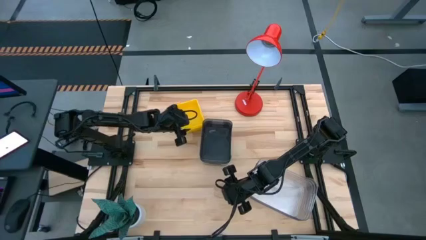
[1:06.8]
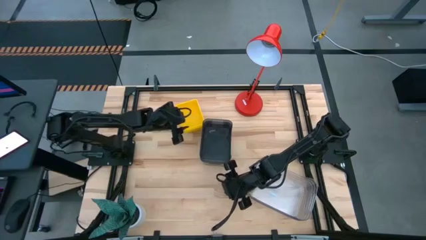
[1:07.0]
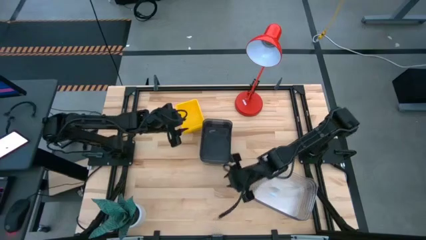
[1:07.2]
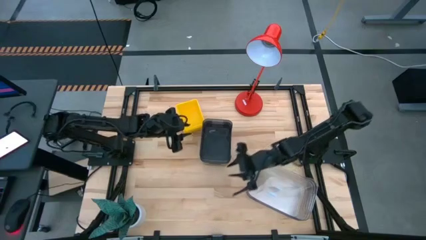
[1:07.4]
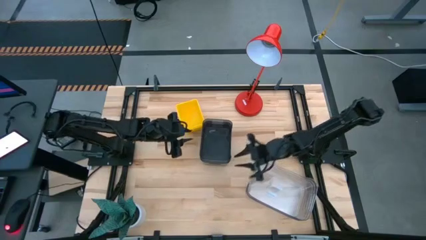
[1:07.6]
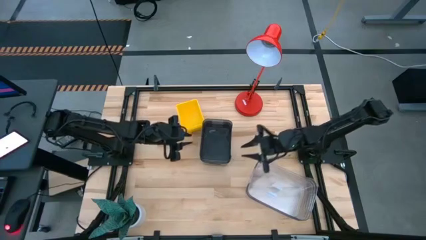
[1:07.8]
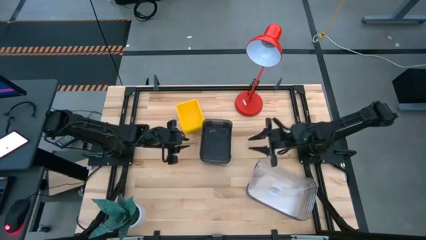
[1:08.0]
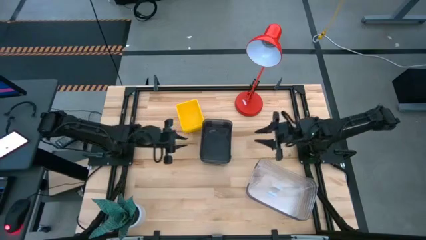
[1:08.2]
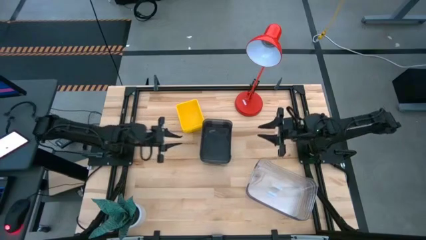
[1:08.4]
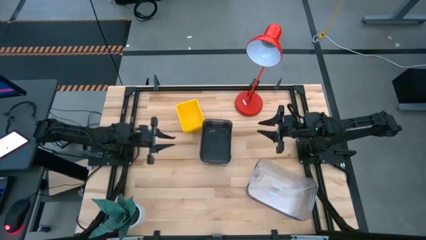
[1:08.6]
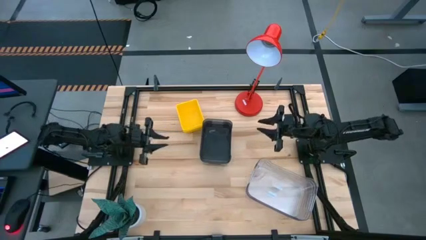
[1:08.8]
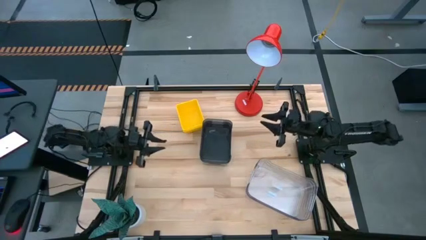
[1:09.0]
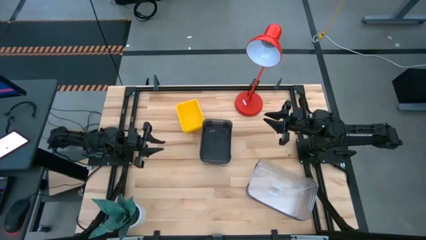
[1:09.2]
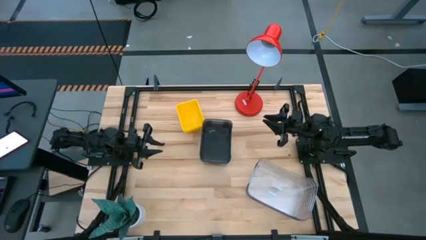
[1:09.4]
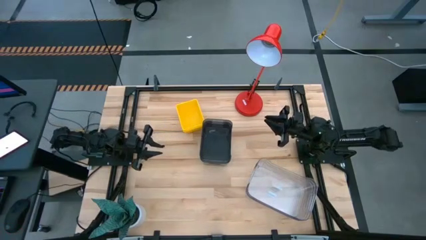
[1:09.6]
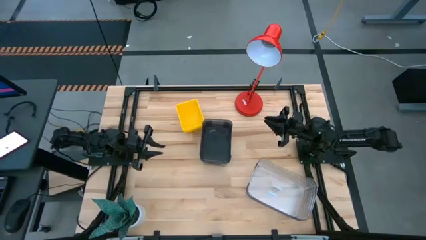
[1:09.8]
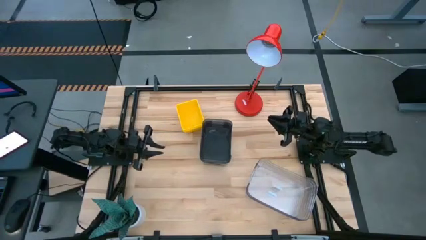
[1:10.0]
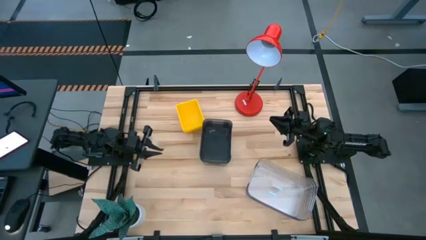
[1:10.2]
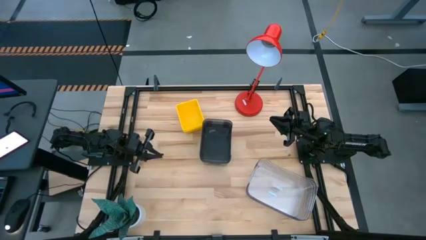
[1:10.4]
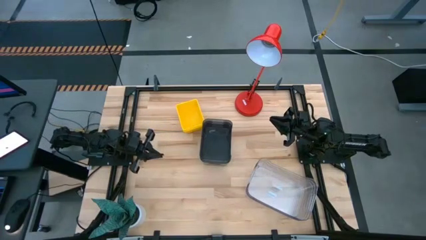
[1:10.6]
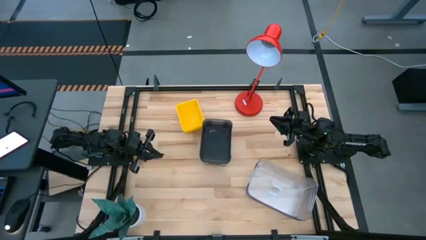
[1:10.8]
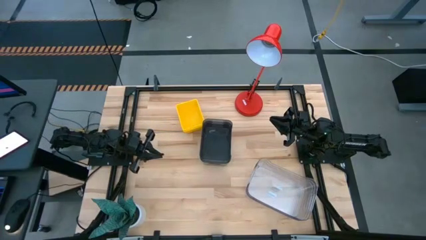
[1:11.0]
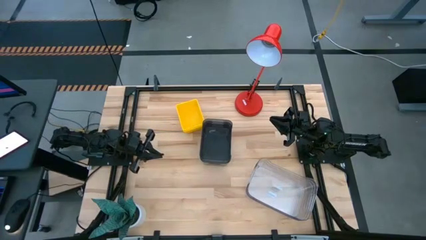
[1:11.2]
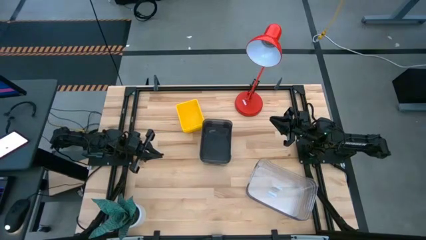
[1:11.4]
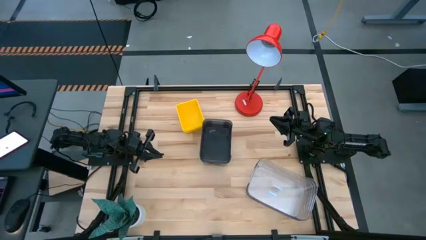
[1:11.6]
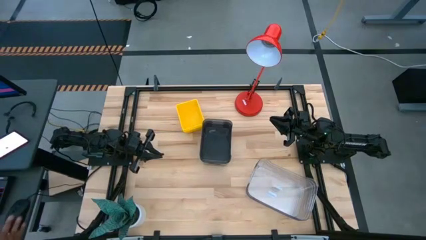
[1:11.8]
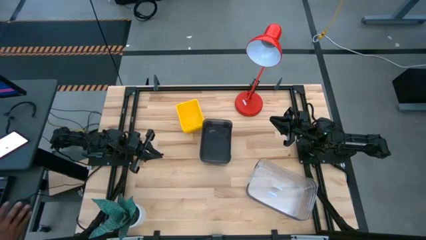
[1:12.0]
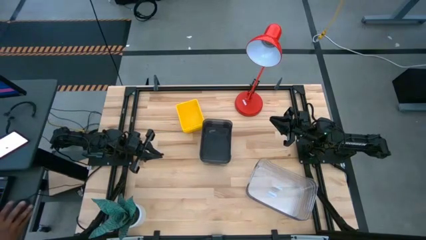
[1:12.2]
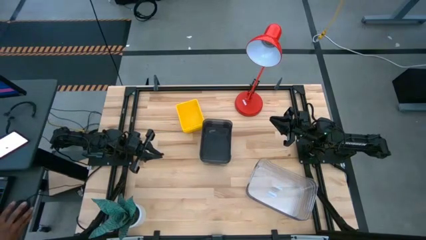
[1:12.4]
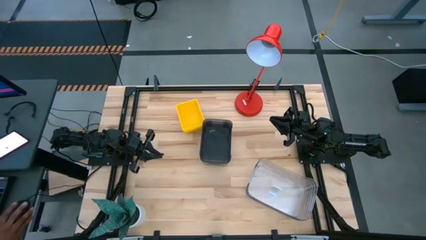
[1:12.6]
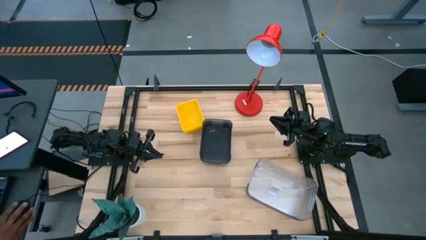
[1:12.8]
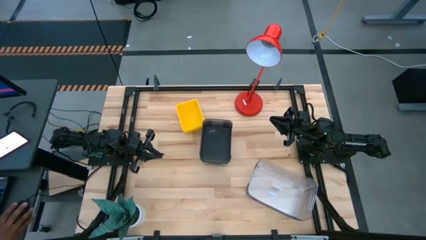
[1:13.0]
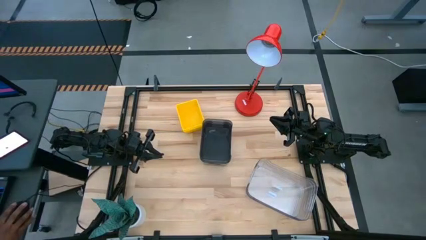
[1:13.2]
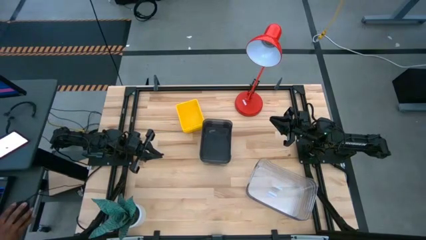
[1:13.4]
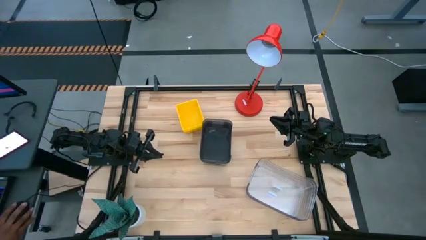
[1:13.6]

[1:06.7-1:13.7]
Return to Home Position

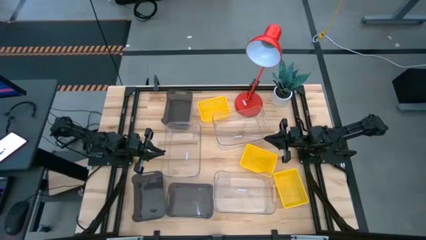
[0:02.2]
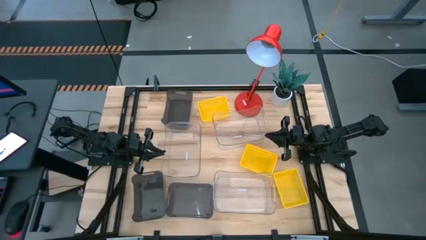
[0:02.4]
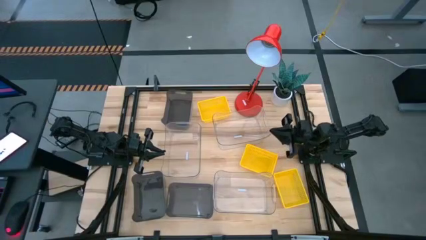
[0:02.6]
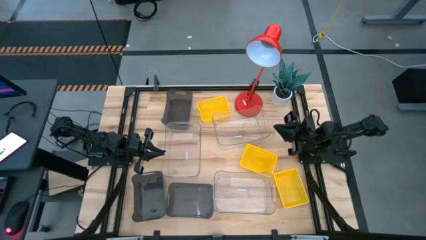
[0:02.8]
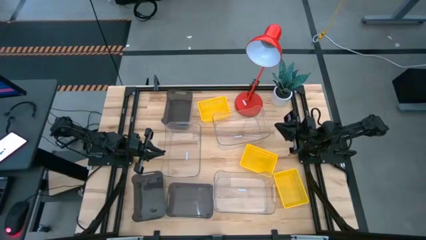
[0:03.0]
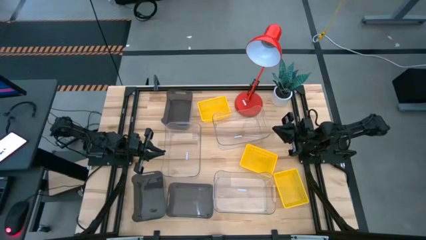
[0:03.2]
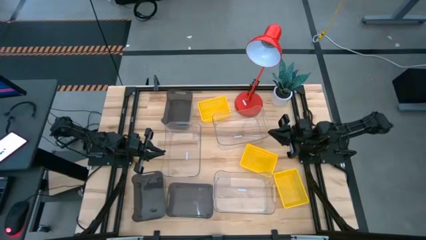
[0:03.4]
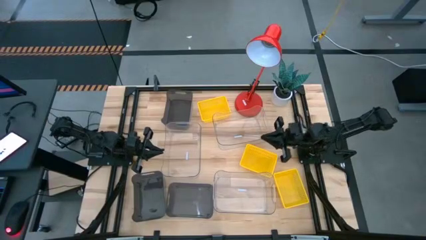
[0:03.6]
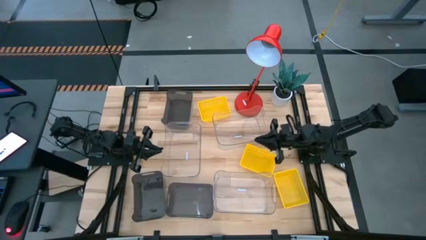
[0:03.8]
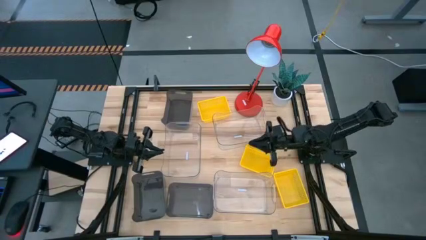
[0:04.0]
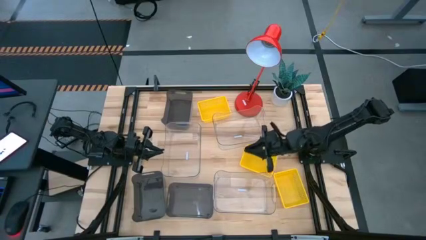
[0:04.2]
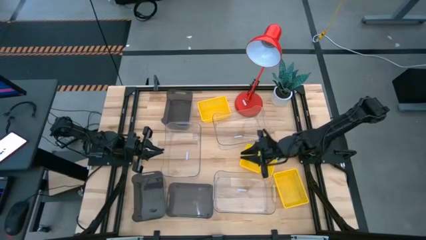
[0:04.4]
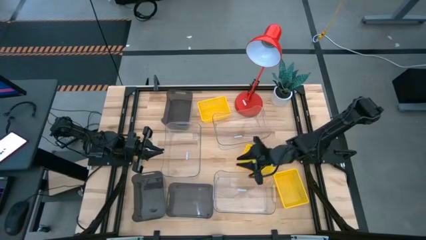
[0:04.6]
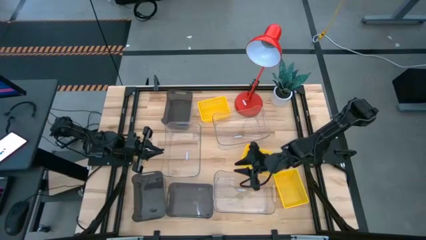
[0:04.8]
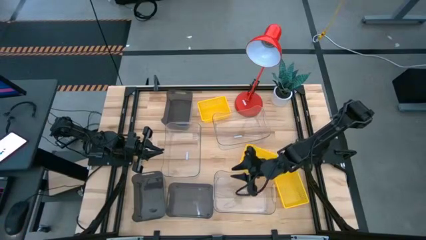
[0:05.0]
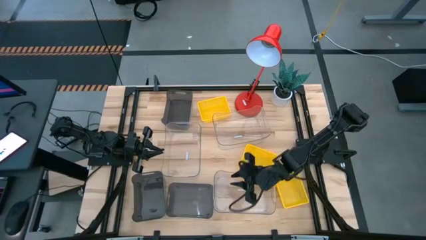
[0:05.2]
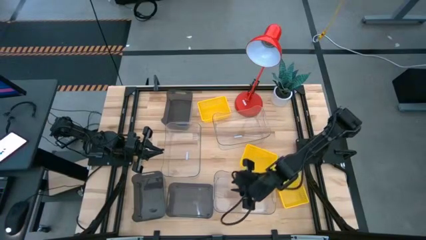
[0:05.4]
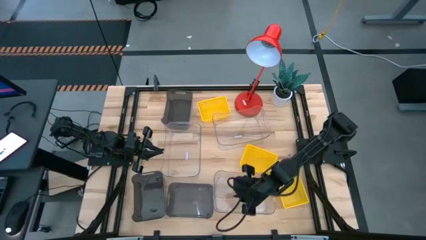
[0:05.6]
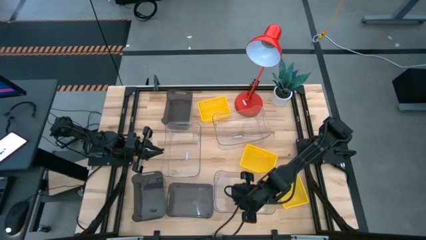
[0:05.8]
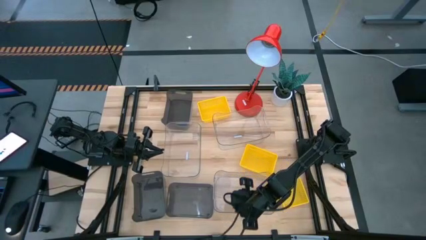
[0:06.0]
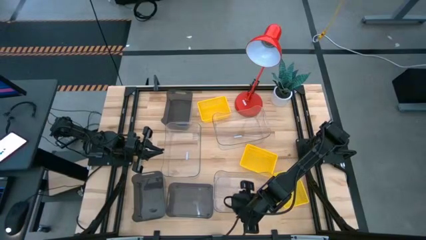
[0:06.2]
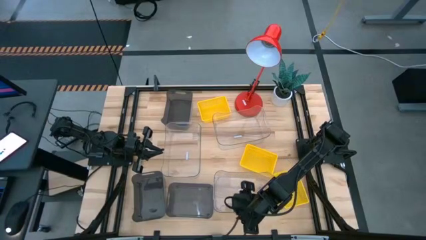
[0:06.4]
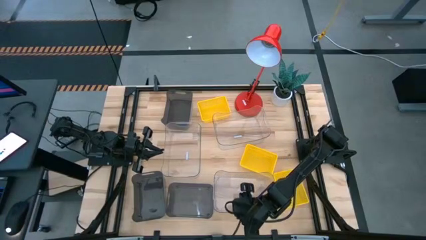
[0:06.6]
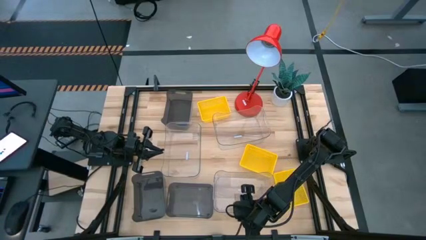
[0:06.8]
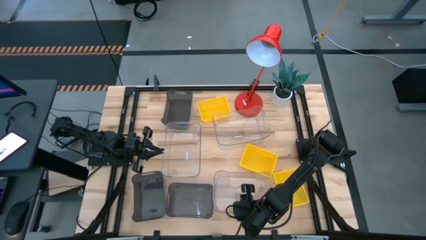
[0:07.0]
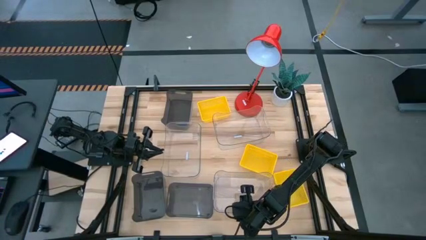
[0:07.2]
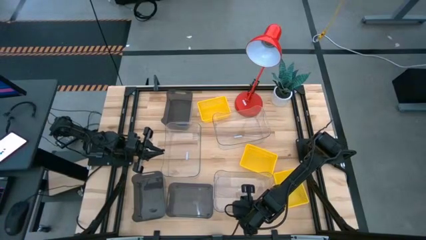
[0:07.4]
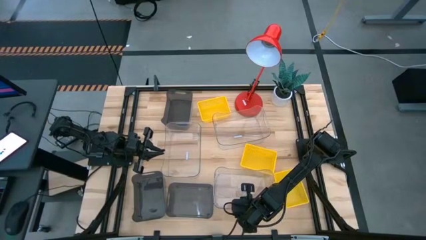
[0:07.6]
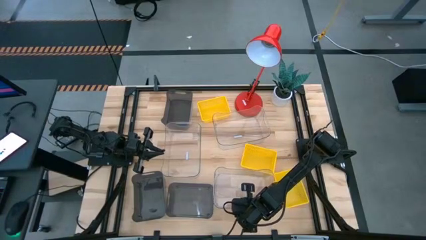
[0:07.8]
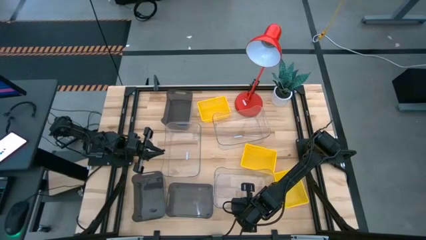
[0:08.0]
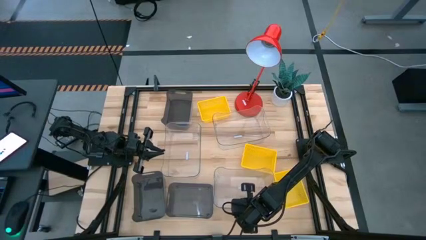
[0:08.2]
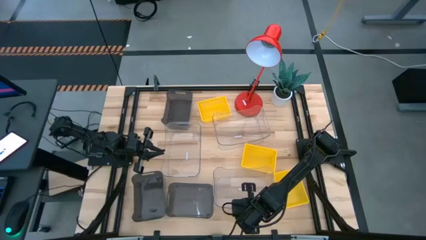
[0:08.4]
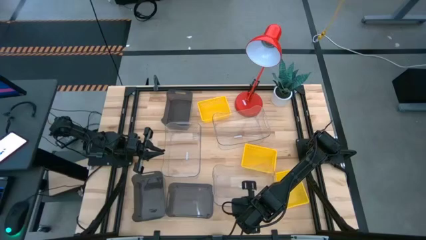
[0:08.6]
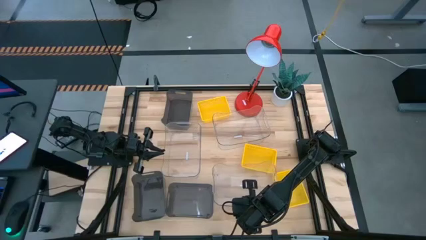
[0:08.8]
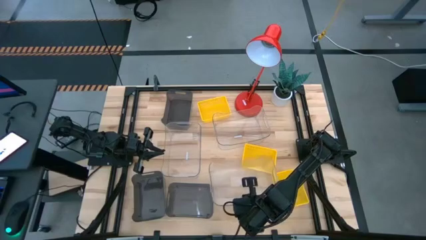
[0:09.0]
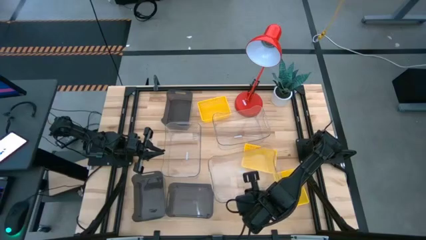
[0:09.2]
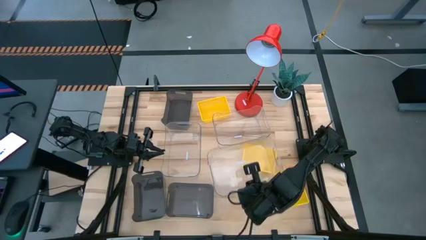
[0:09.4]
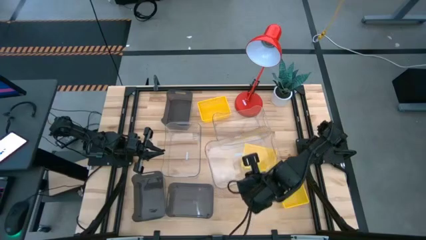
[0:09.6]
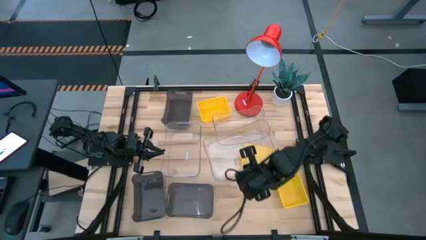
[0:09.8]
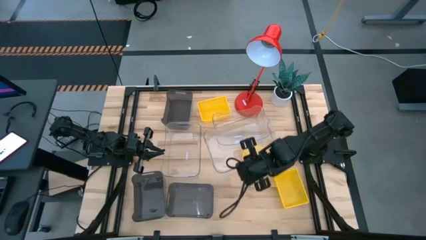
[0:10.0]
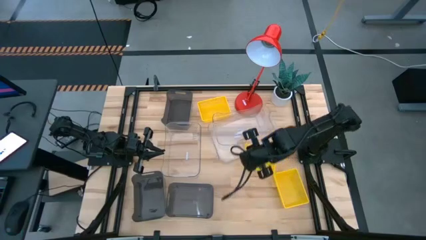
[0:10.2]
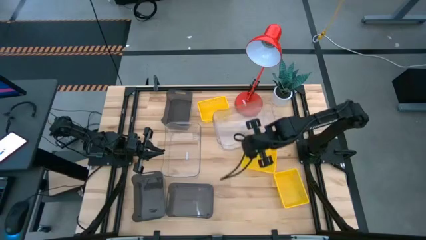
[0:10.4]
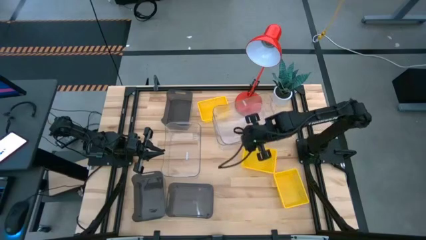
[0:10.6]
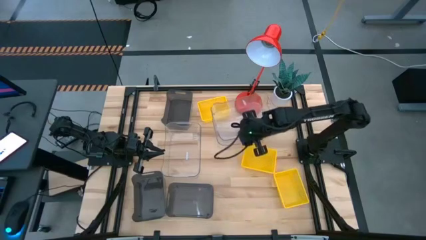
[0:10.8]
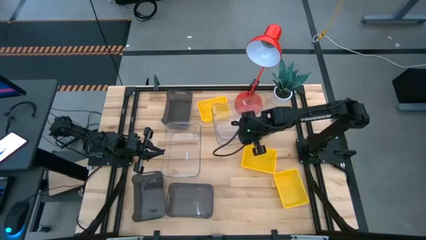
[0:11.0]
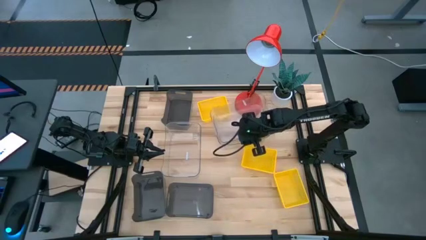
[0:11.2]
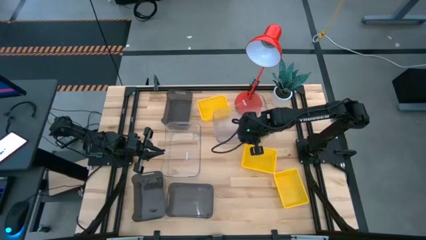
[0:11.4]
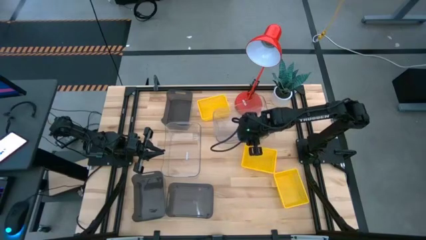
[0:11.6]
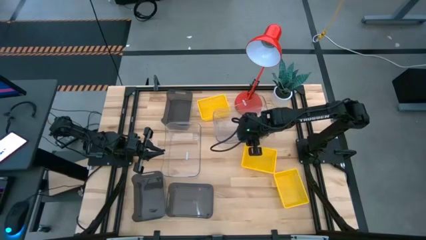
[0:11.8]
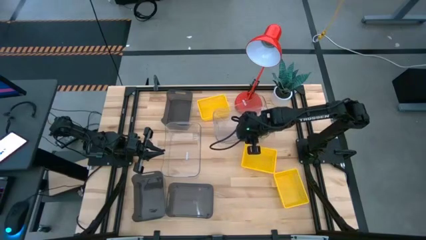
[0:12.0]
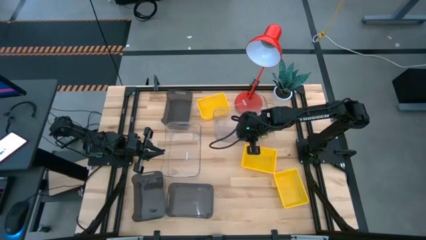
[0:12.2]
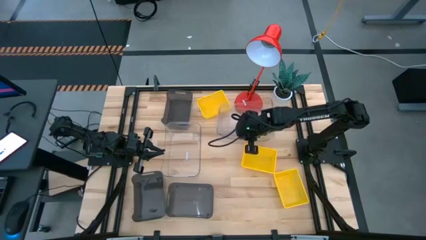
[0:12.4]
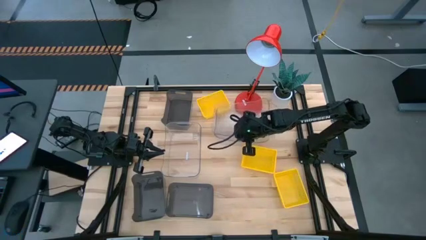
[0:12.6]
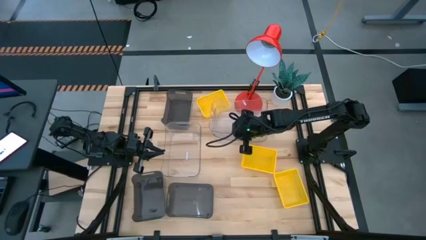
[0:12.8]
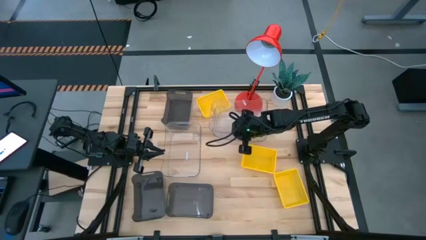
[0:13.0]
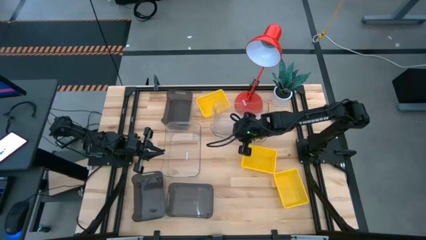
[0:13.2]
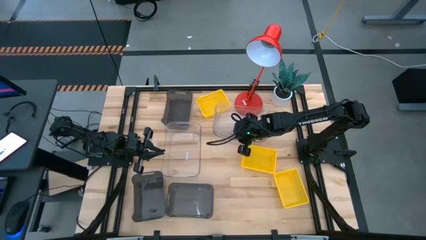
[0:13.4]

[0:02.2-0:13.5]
Stack the bottom transparent bin on the top transparent bin
